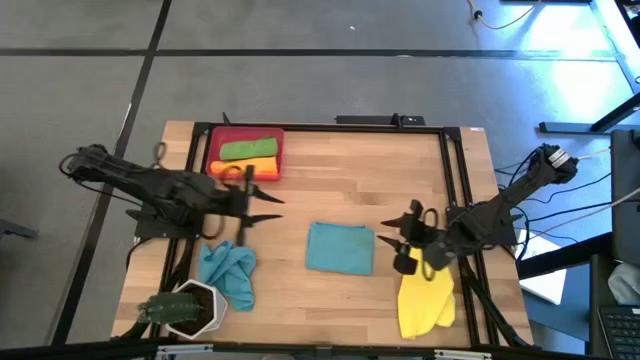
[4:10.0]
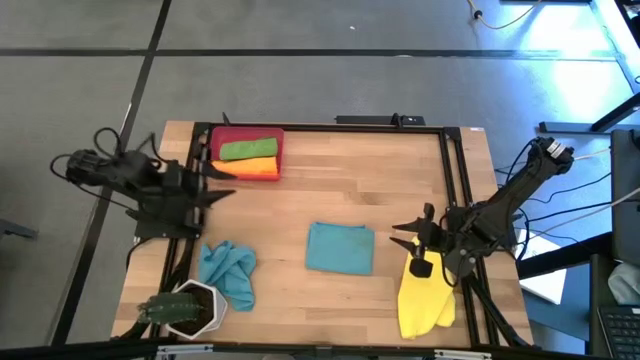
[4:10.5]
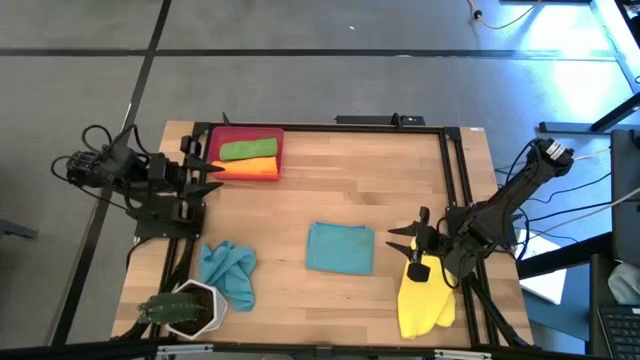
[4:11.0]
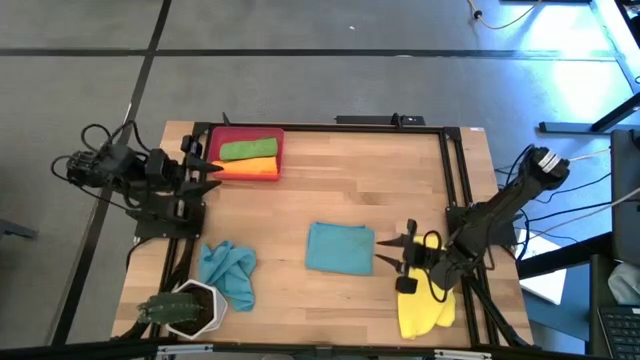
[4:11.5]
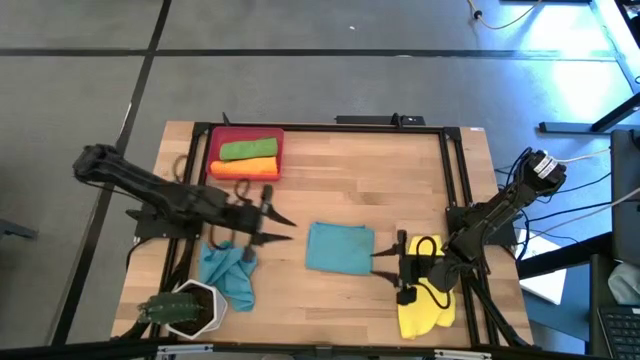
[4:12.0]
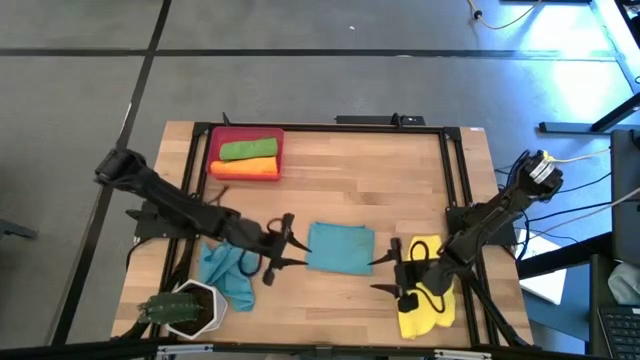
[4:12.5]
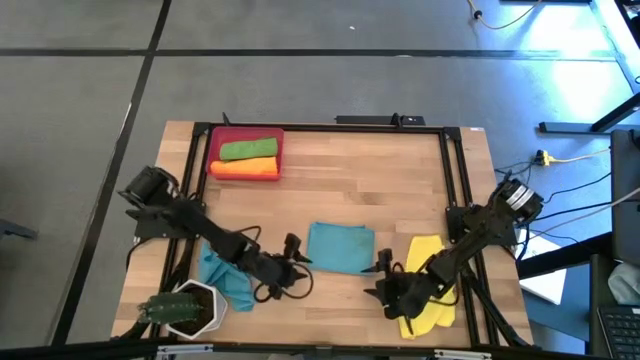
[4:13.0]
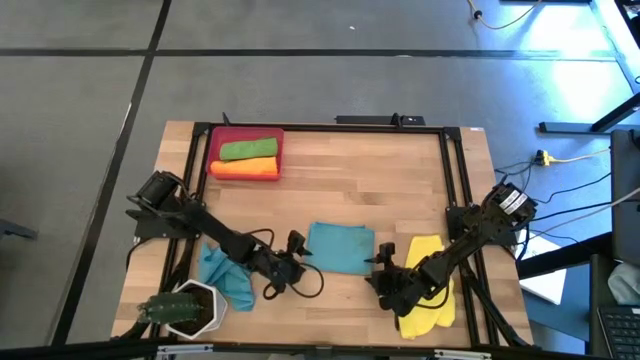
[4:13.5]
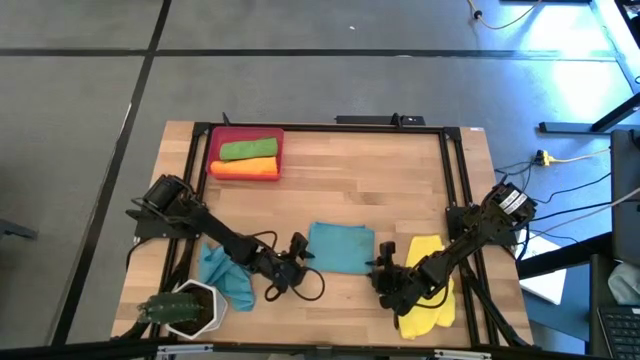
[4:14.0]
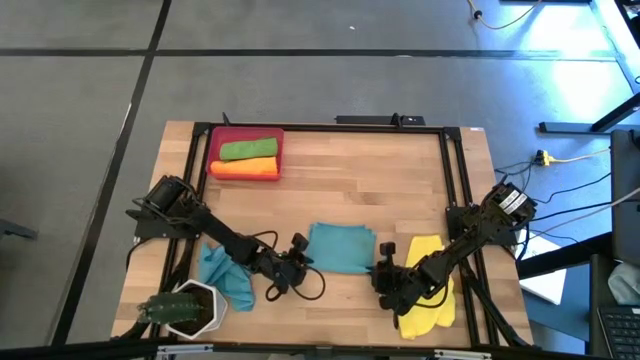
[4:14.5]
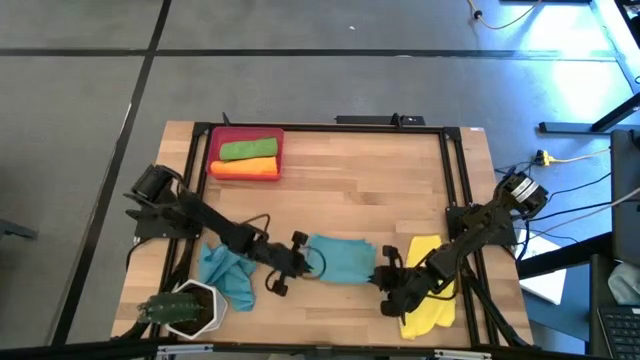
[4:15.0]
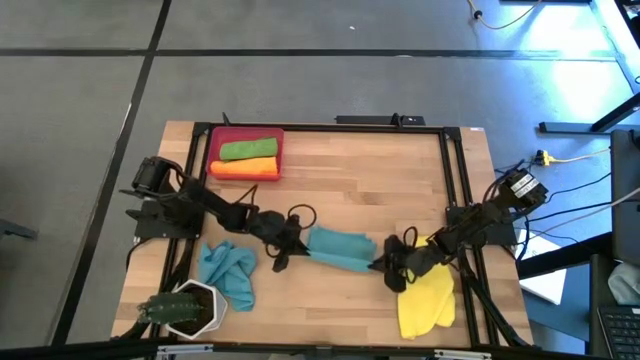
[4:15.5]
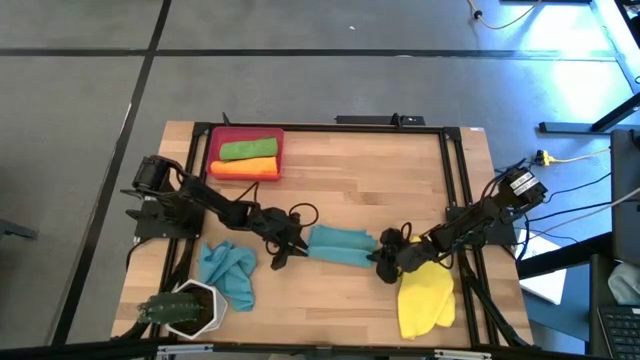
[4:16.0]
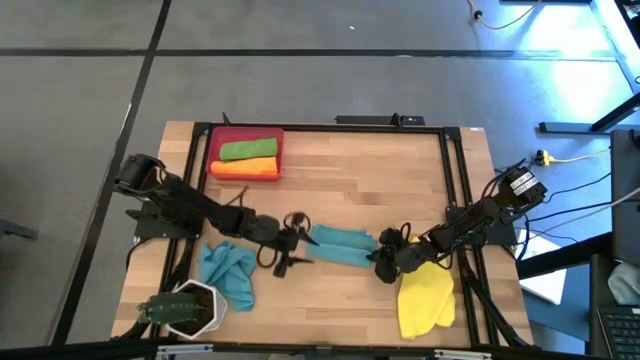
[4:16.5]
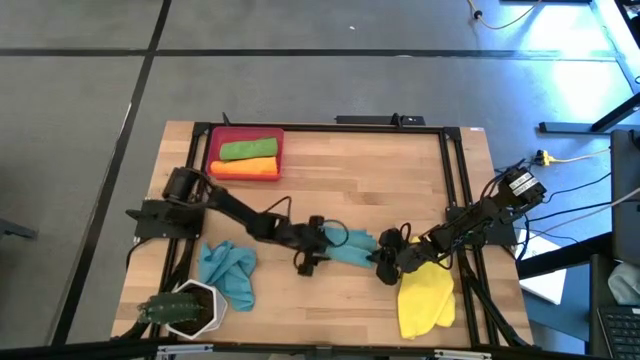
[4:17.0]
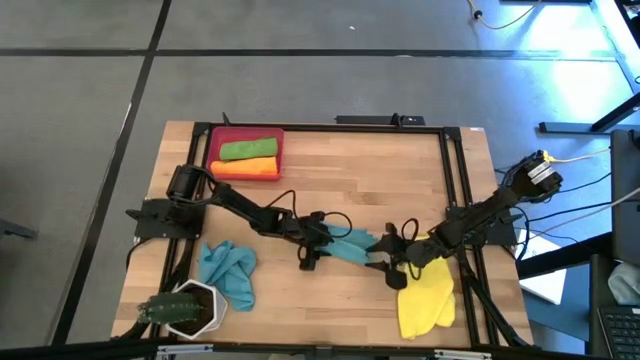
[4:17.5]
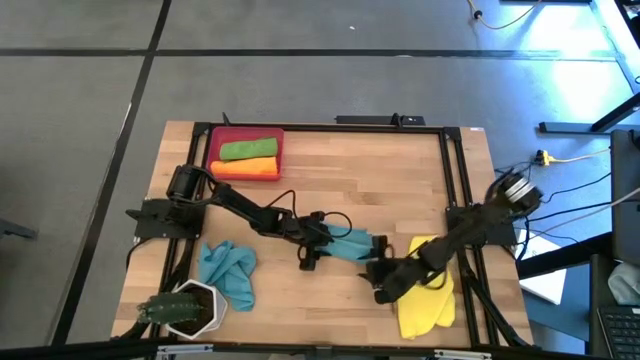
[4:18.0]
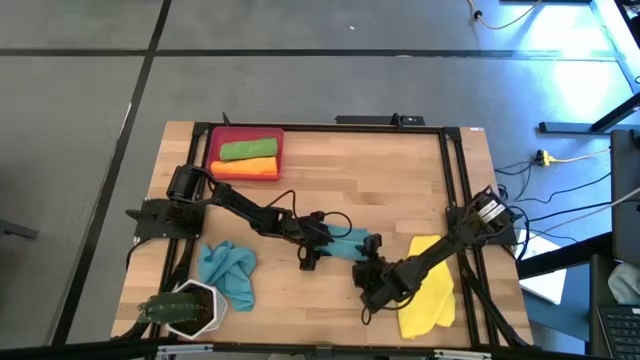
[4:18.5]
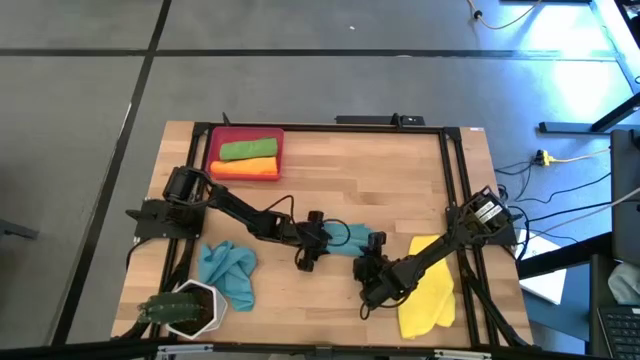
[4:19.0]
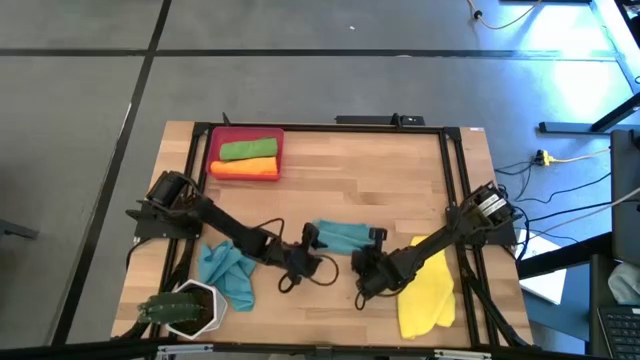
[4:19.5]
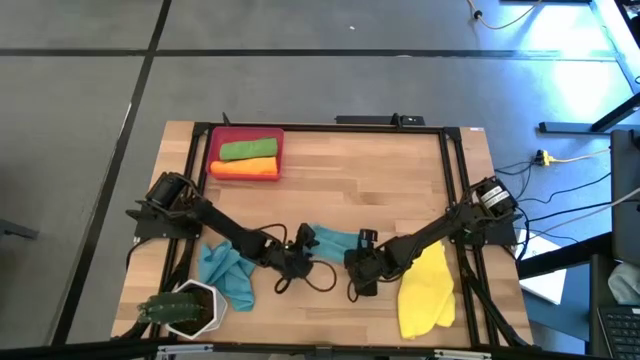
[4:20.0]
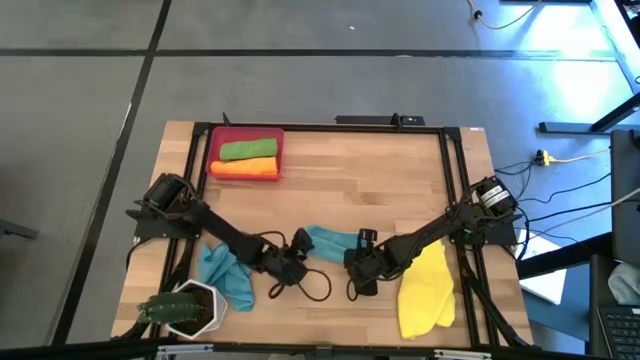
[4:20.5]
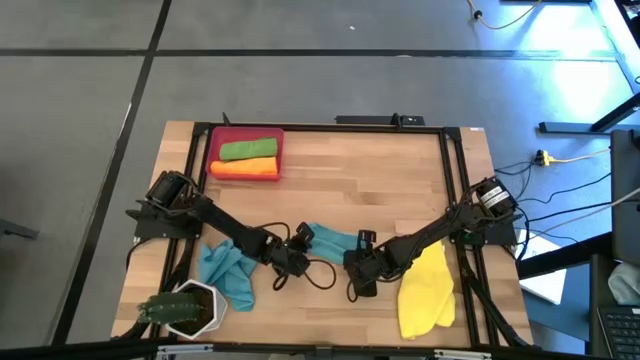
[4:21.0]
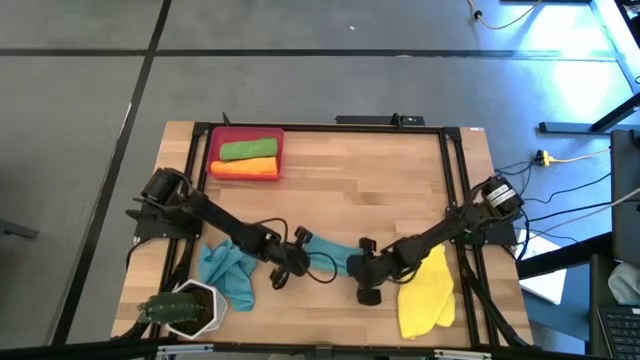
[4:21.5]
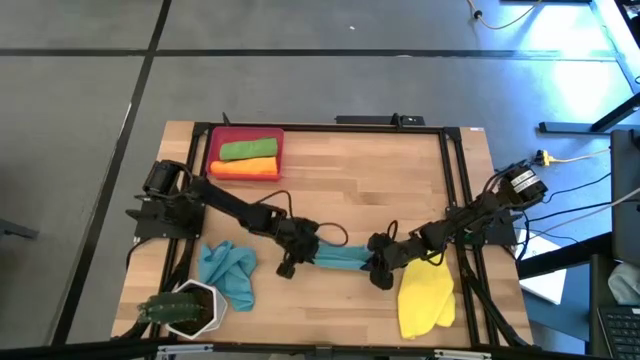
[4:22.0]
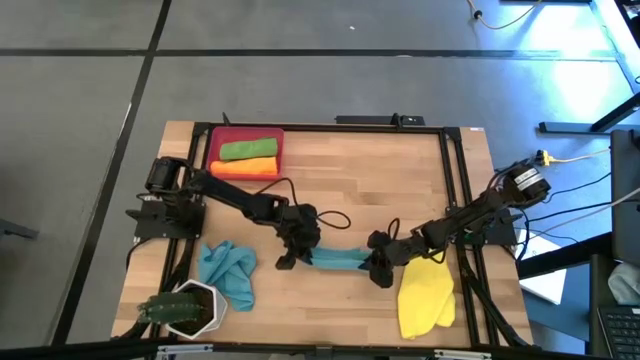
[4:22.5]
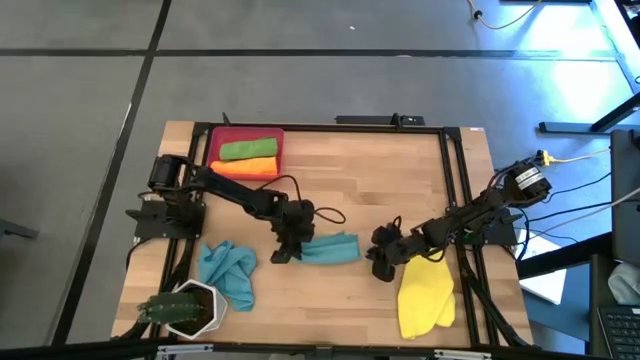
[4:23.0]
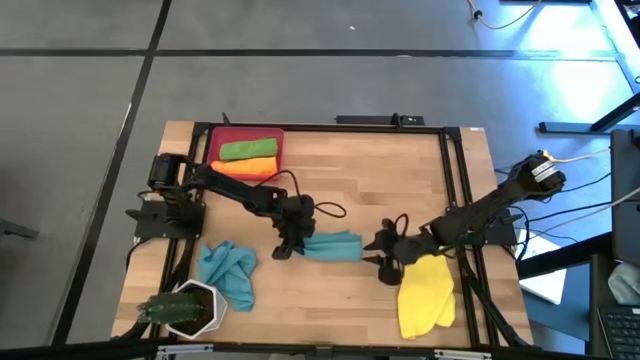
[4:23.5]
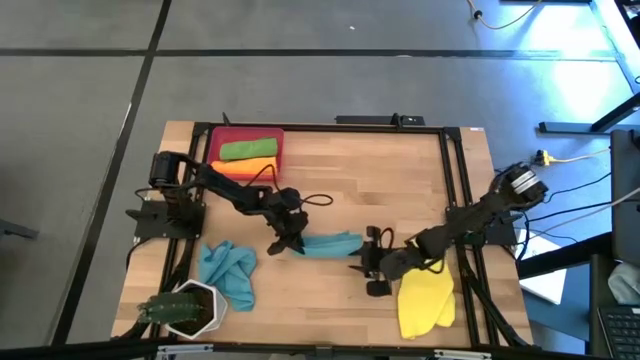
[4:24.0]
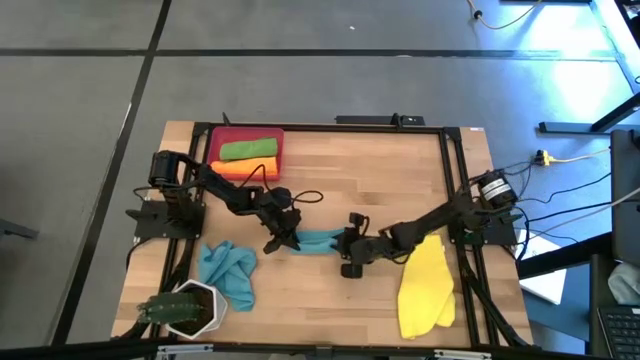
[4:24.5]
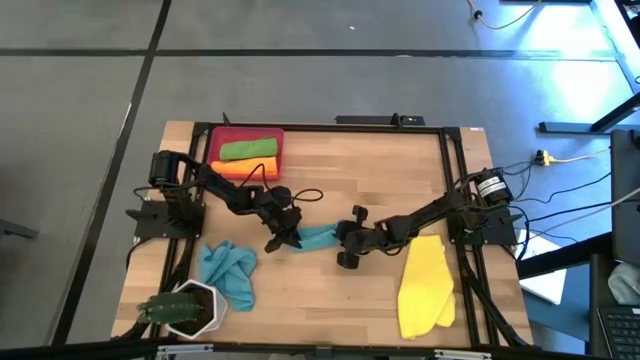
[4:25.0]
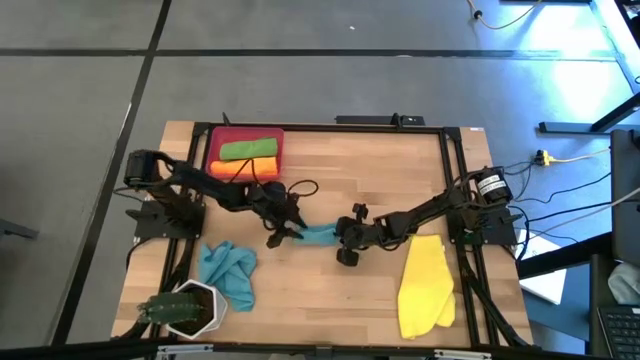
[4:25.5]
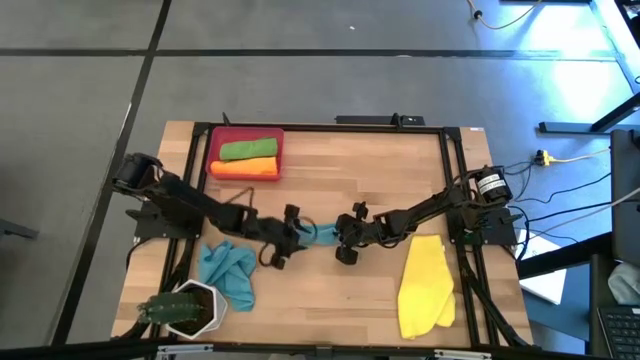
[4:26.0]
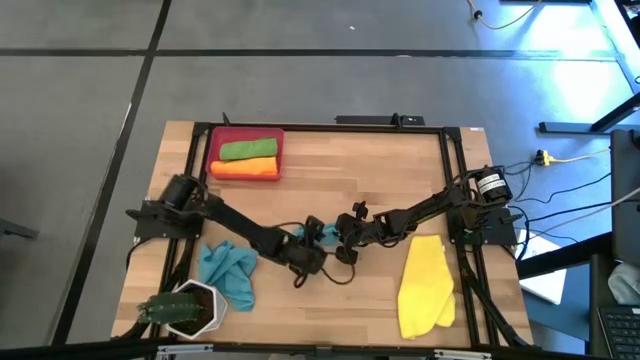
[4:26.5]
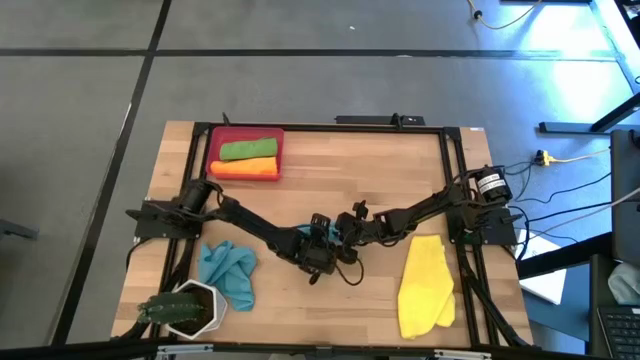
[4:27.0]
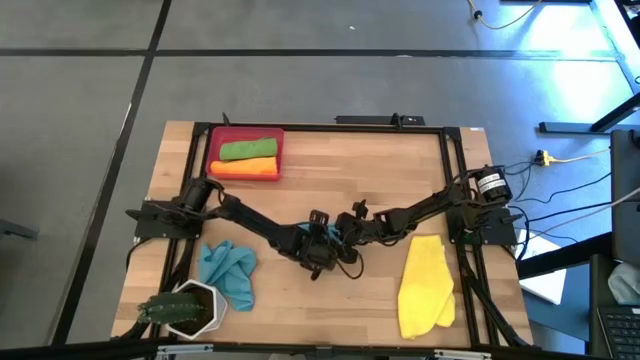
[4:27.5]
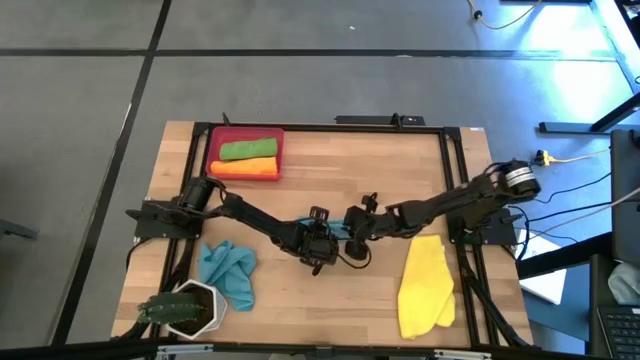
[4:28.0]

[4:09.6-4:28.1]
Task: Roll microfiber towels into tight, uniform cylinder then place into a basket
Roll the blue microfiber towel

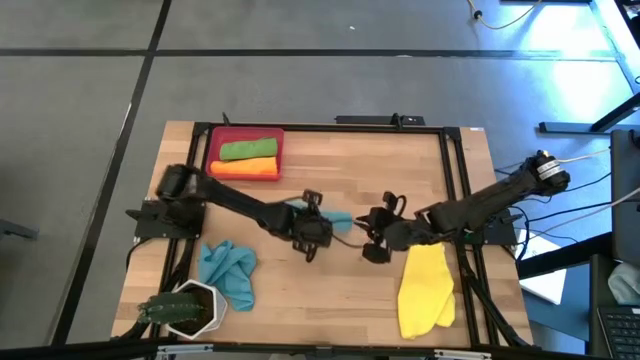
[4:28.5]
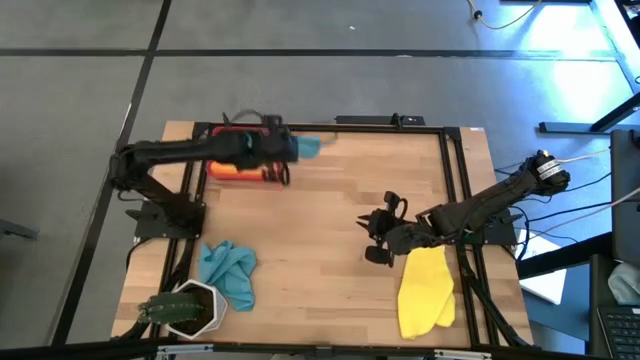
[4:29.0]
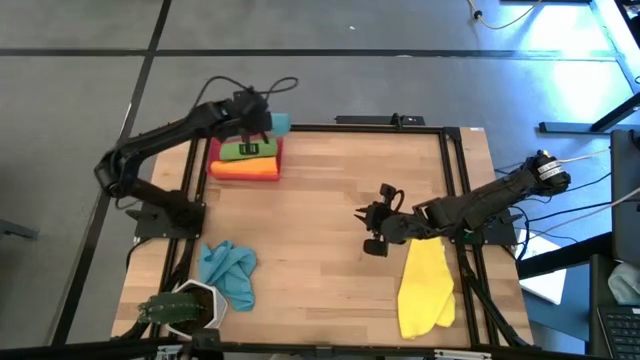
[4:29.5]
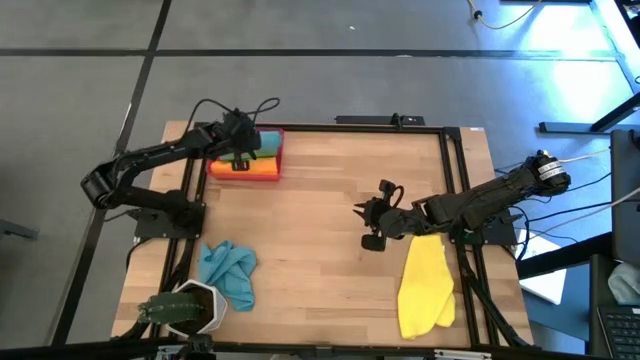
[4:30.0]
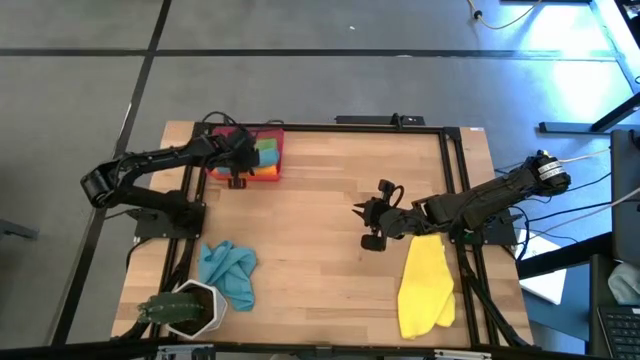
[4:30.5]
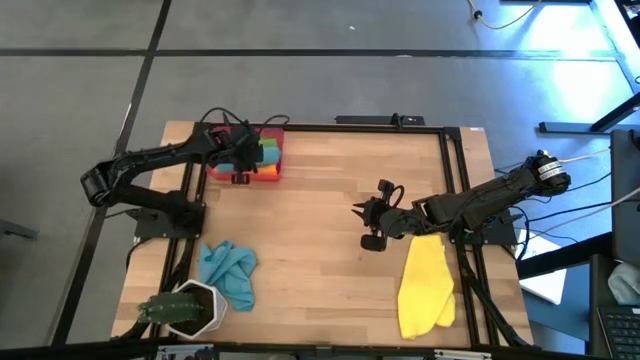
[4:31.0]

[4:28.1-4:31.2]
Put the rolled blue microfiber towel into the red bin

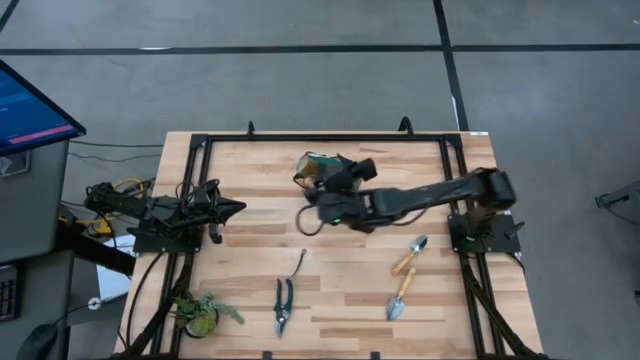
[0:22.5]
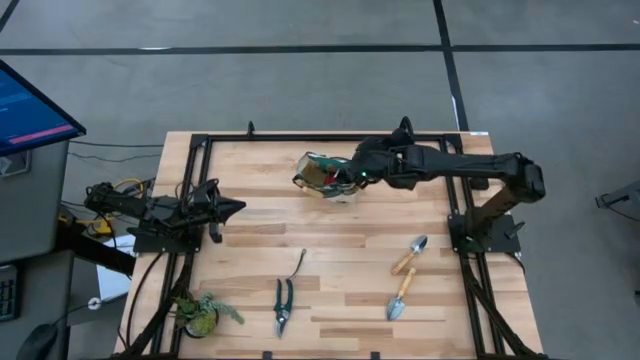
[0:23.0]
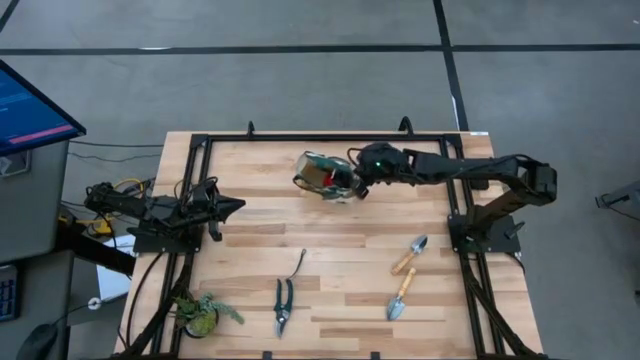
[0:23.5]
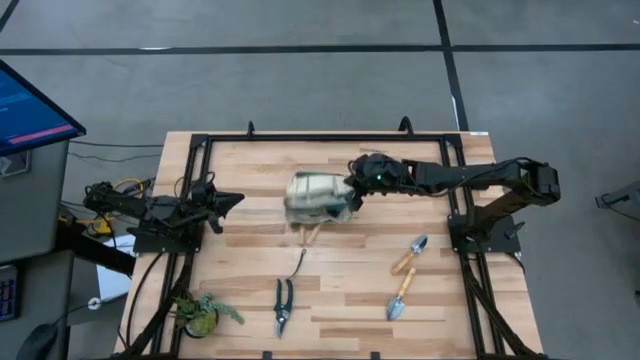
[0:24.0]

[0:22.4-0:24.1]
Task: Pick & Place Garden tools in Gardening bag
Adjust the white gardening bag on the table
